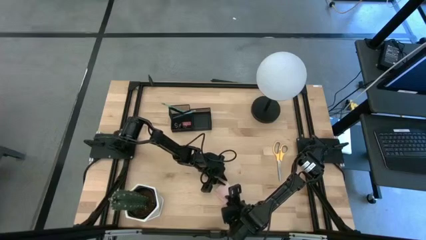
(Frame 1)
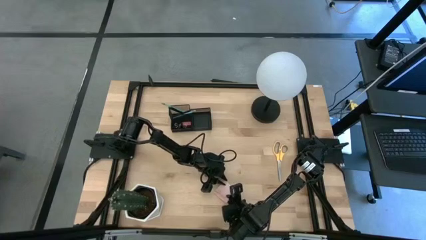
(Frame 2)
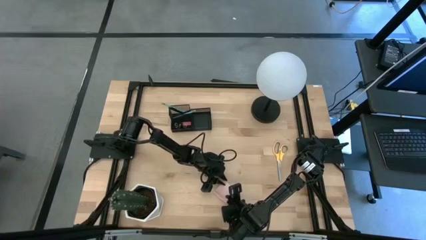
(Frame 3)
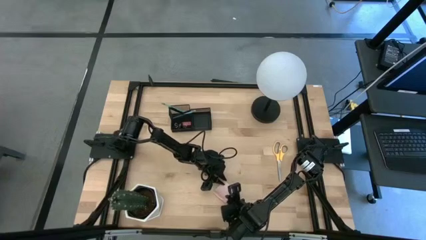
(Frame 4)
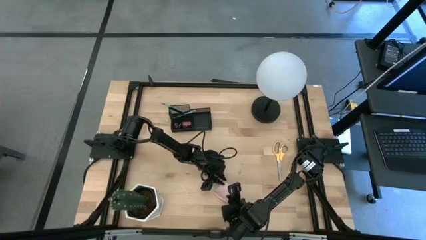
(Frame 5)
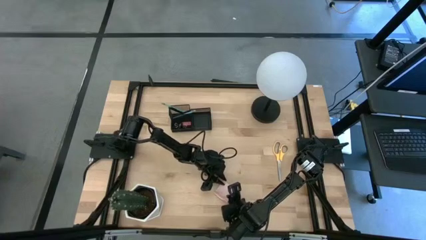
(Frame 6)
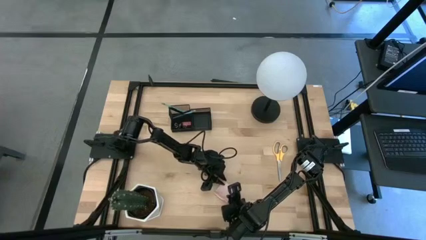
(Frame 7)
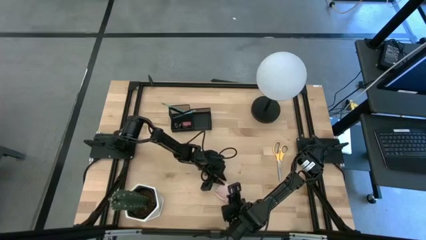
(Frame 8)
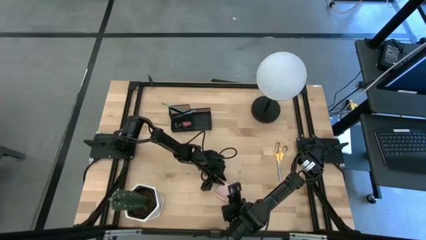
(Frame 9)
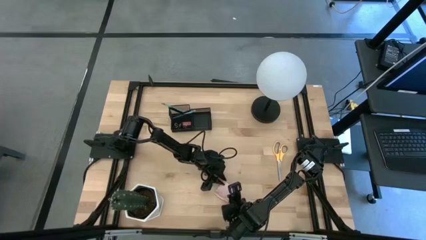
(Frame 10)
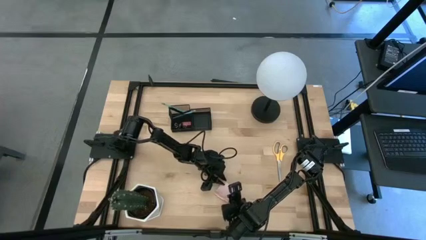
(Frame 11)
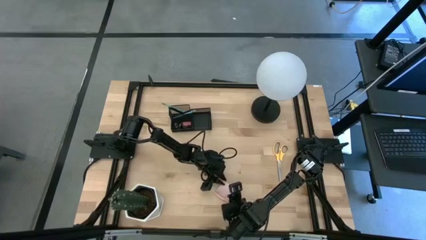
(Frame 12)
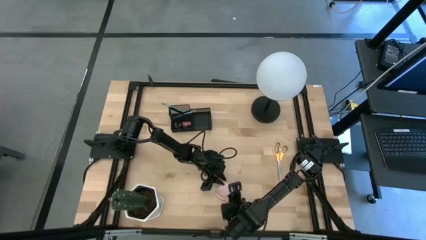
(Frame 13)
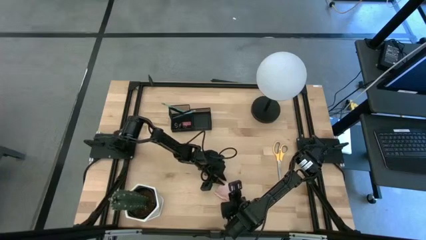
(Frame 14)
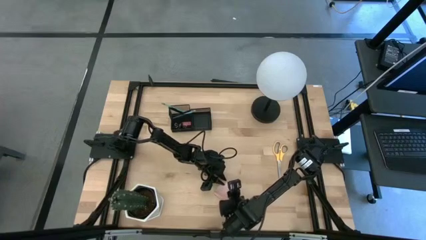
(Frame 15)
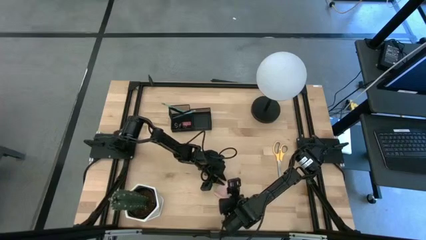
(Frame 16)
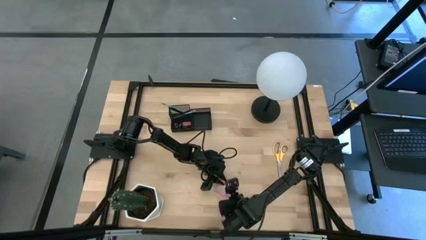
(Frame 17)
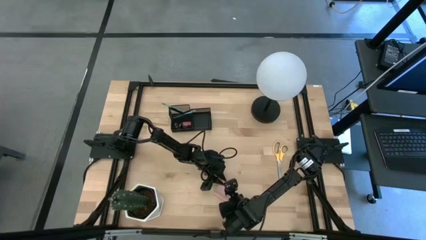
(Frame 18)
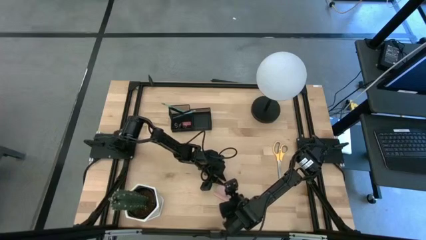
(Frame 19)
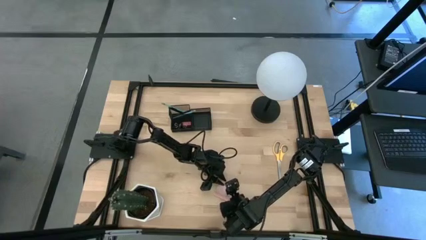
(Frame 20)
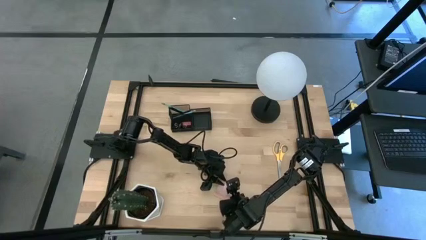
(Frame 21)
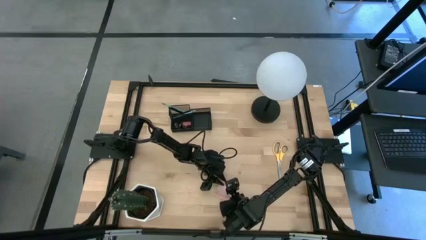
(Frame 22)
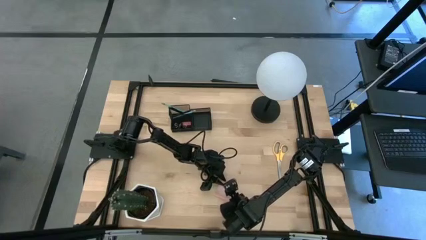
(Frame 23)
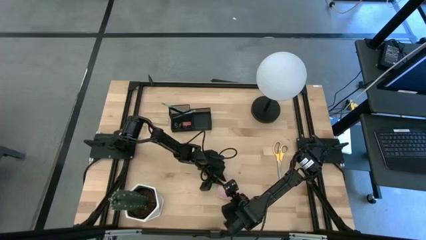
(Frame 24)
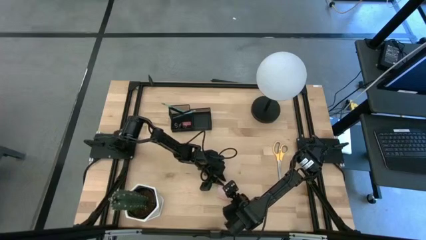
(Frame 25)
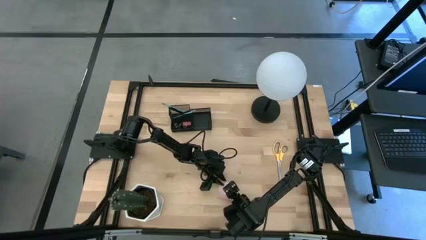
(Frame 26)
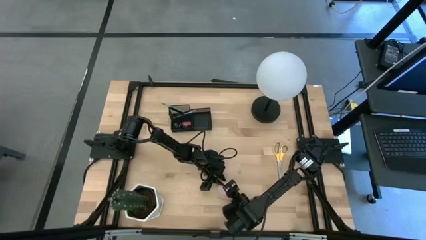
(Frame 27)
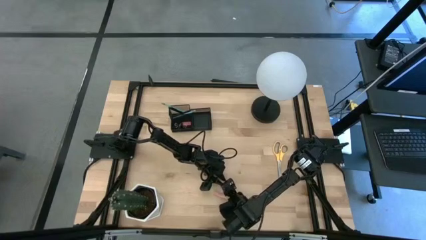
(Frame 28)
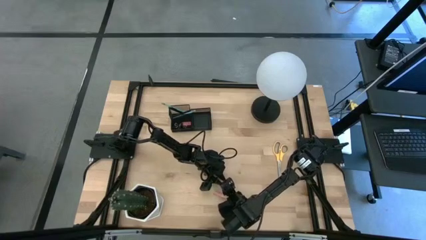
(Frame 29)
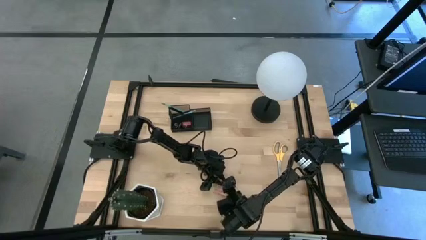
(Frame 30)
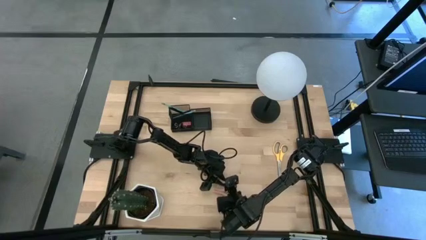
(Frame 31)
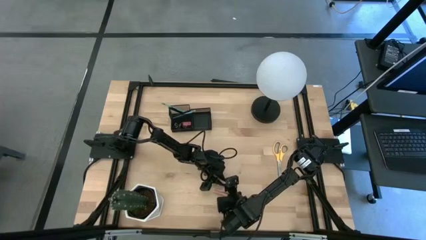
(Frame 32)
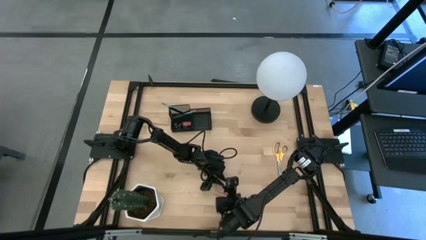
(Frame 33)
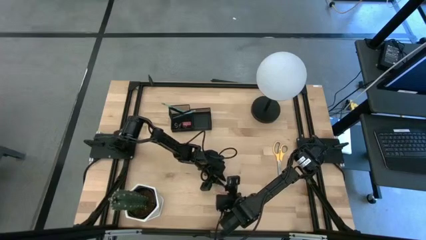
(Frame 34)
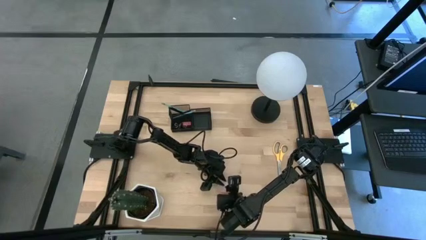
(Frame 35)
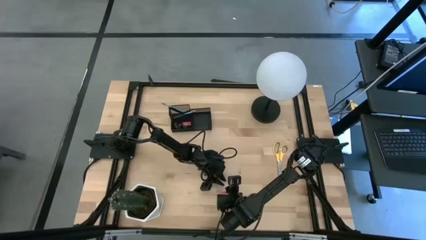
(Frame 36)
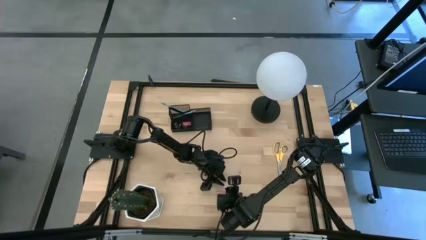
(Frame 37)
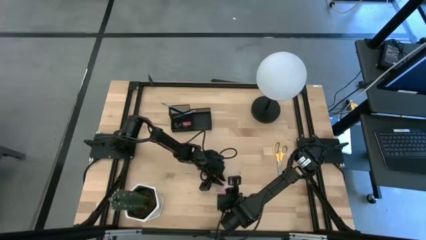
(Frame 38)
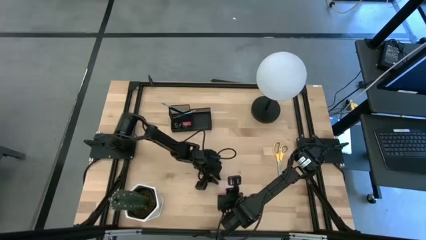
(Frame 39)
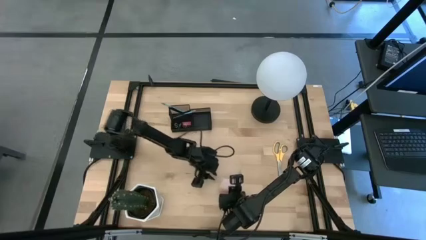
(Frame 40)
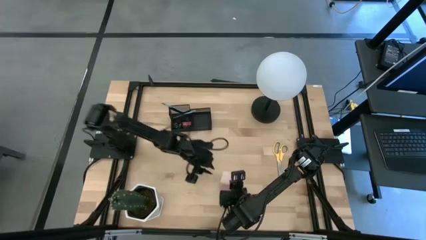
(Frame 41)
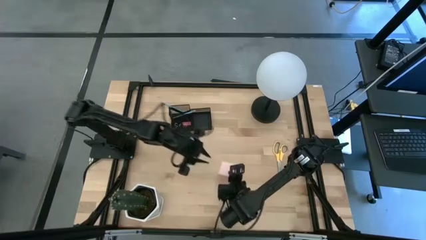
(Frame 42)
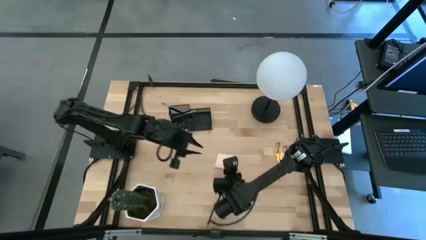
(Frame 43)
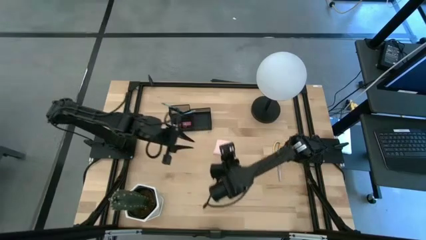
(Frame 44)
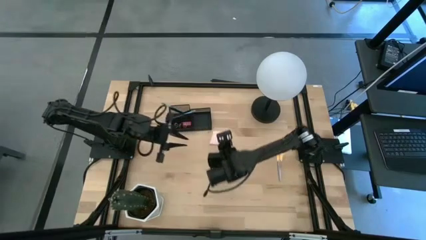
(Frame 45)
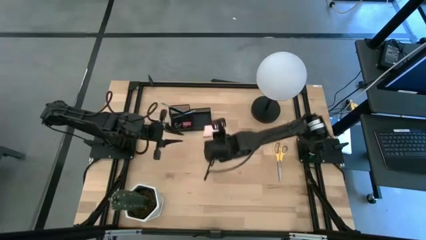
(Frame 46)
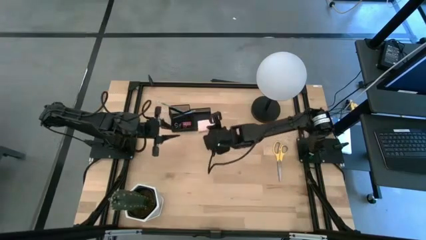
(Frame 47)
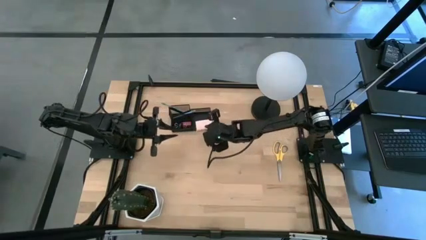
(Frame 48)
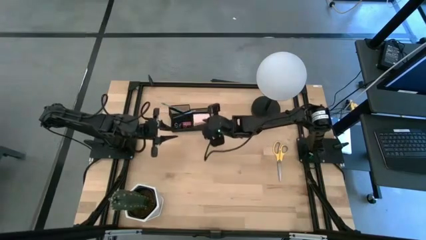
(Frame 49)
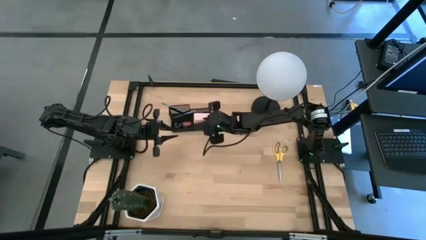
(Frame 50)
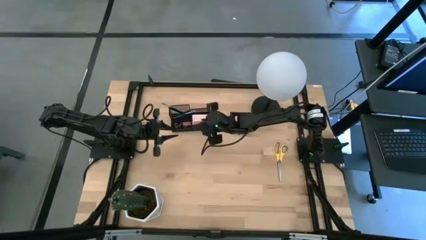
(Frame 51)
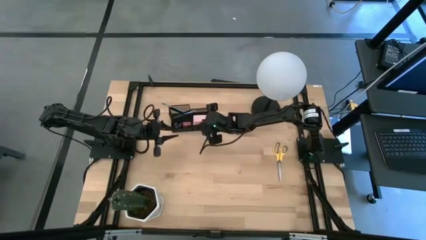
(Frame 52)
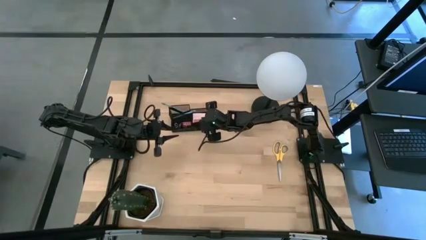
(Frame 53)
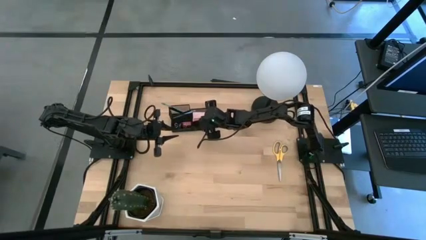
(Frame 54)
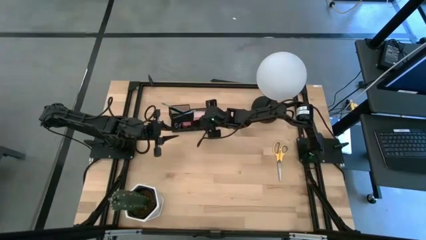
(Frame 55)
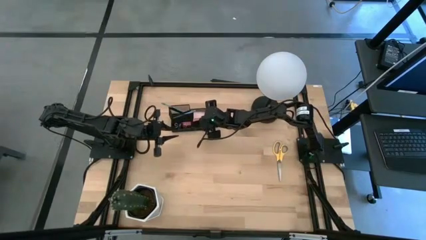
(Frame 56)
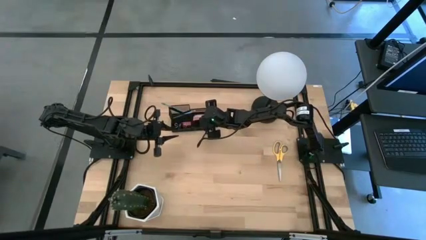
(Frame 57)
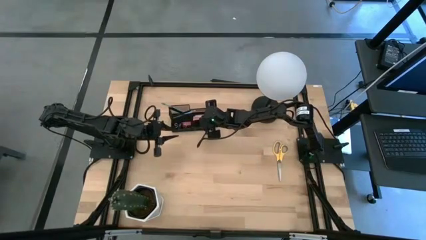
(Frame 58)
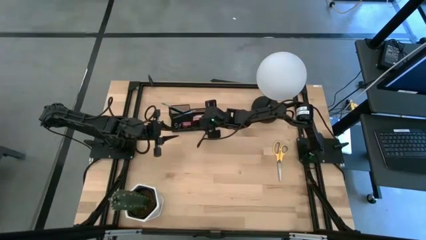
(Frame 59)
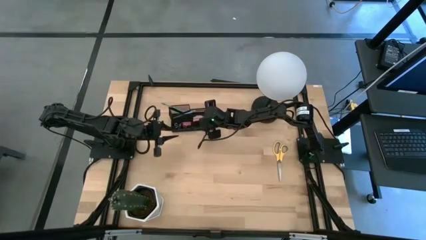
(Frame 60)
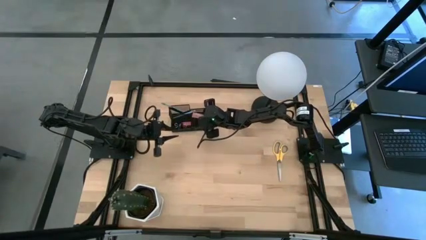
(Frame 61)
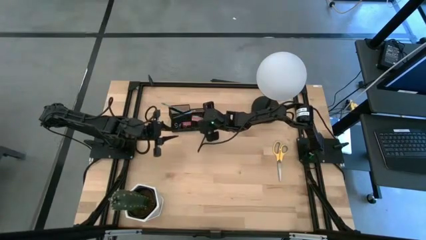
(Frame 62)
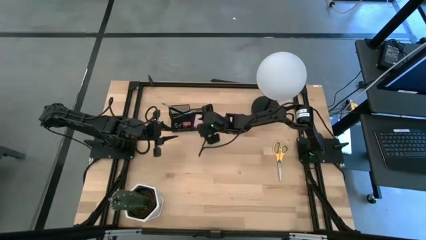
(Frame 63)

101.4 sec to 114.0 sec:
Task: Pick and place office supplies into organizer
Put the pink sticky notes into the desk organizer

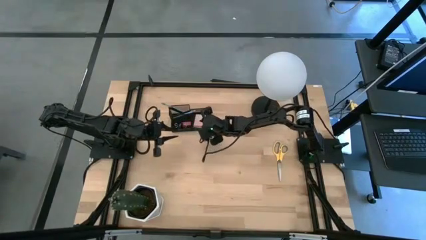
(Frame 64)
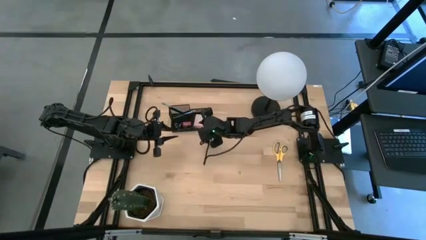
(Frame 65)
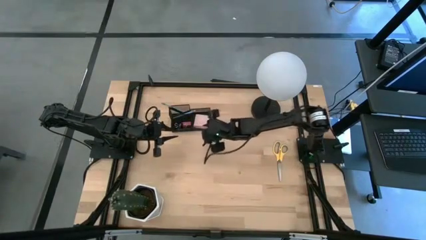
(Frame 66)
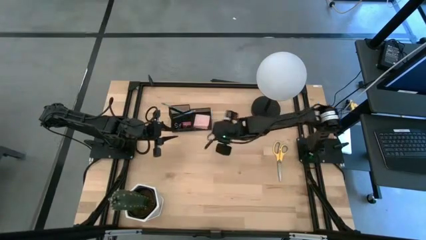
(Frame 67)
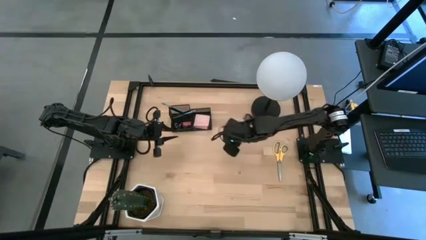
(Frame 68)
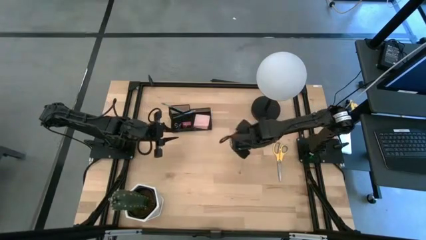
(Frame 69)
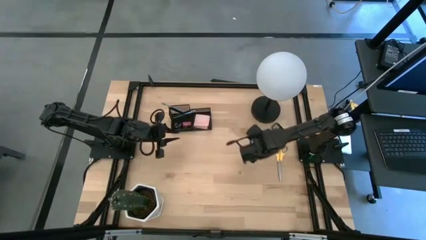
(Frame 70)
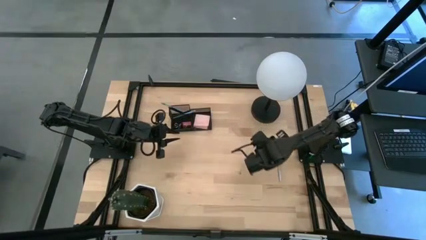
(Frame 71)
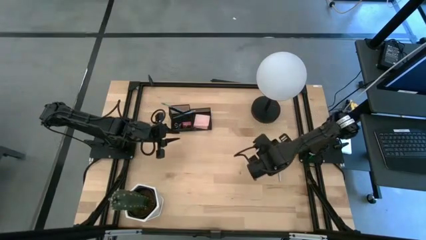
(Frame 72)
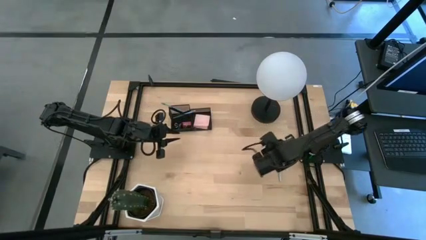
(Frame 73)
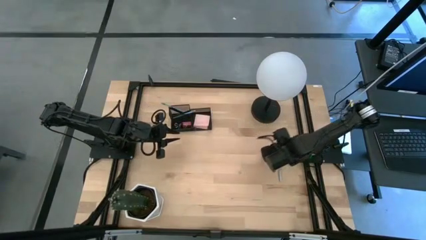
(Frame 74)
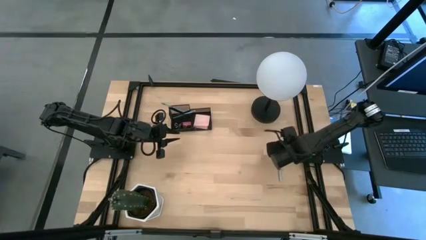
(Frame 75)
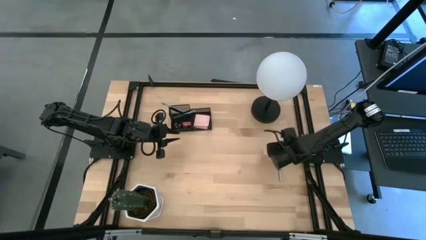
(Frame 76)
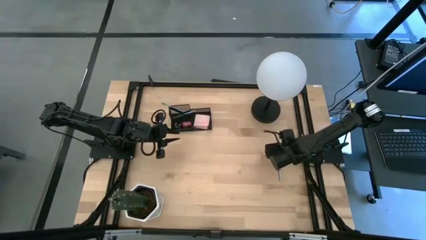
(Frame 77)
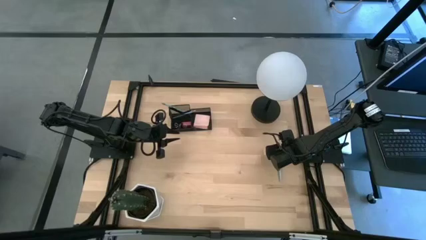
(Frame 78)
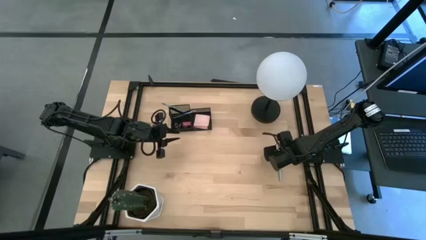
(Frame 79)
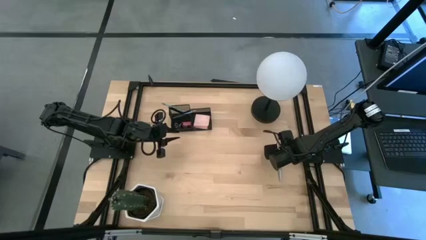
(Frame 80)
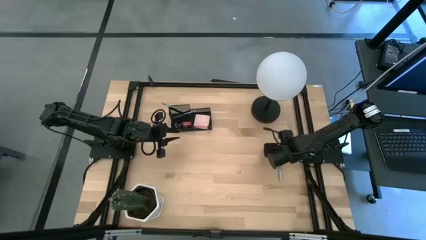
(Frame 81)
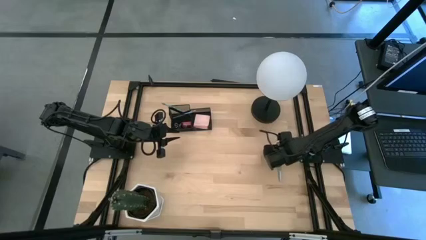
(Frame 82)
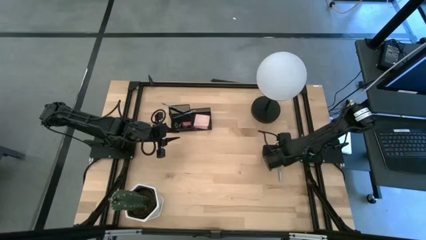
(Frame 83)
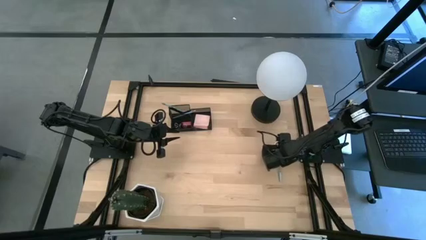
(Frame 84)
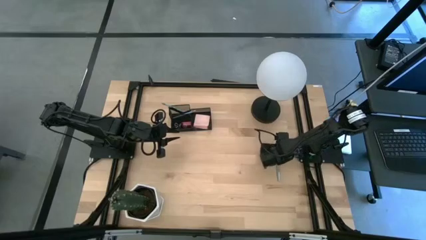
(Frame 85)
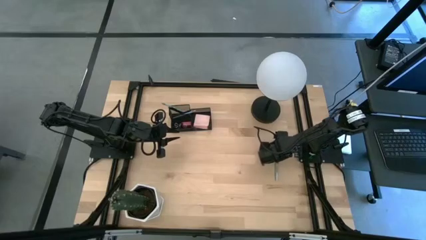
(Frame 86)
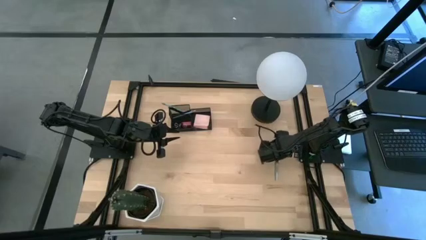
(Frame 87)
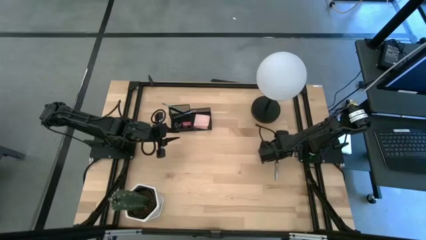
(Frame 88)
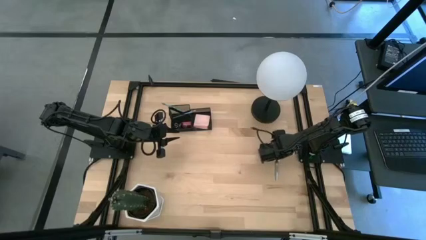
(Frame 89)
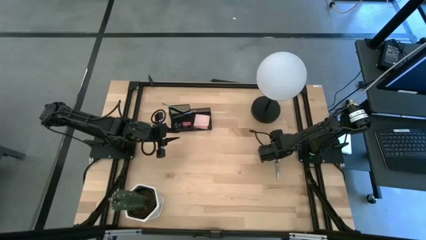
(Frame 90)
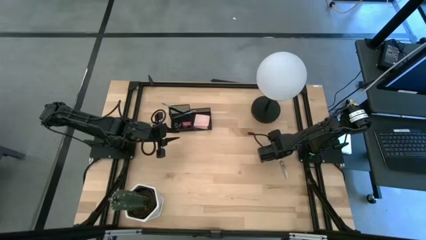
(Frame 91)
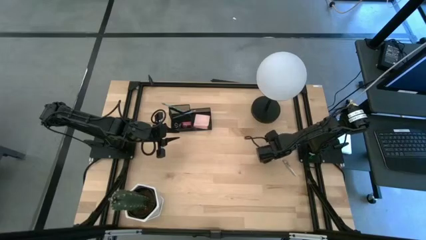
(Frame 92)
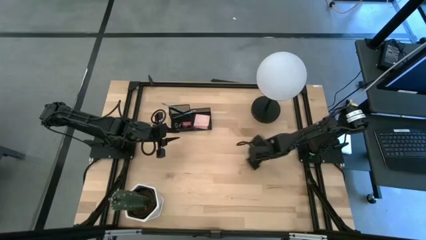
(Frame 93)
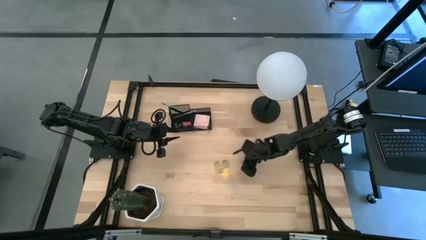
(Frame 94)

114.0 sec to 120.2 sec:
Put the yellow scissors into the desk organizer
